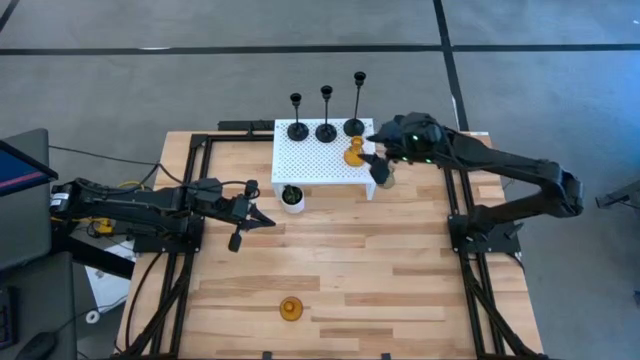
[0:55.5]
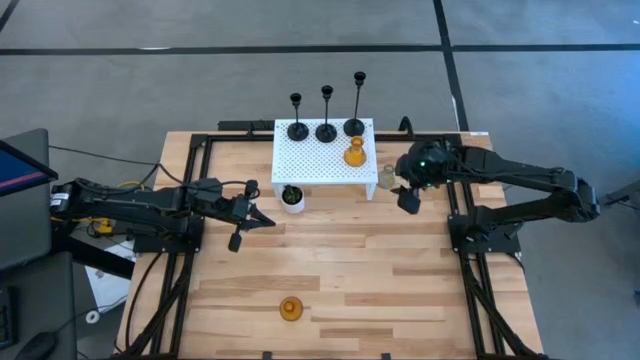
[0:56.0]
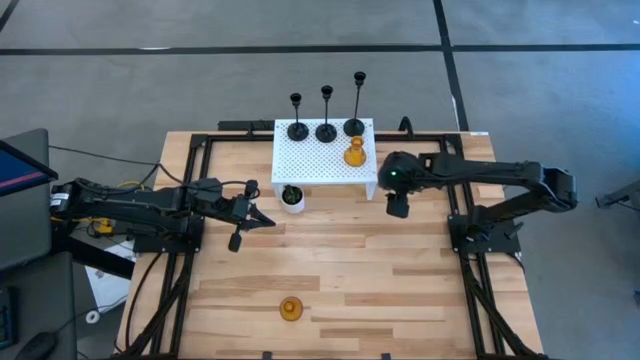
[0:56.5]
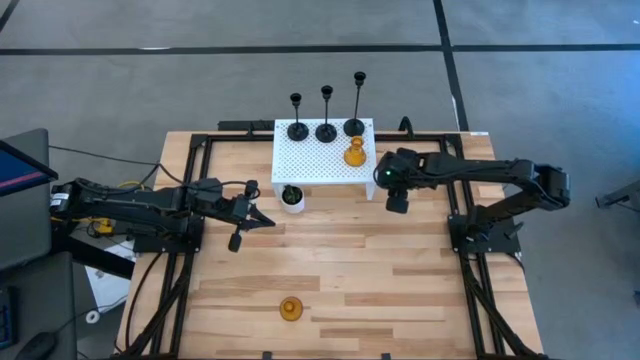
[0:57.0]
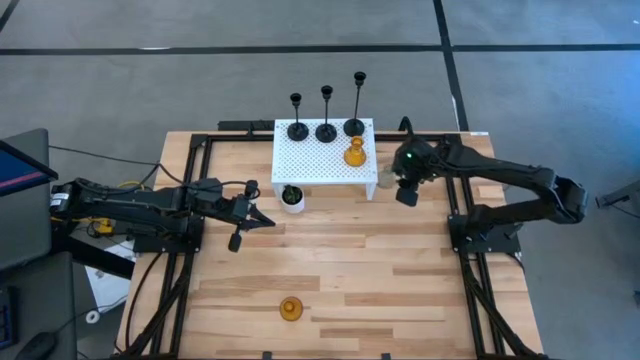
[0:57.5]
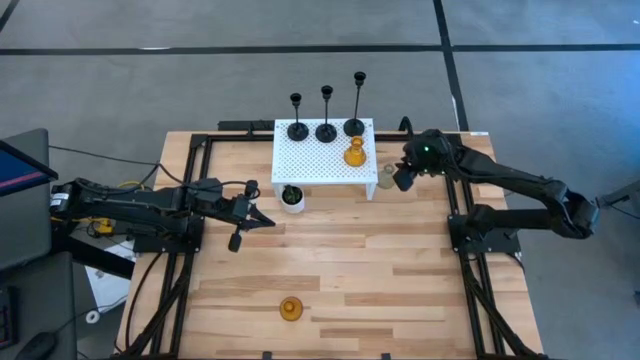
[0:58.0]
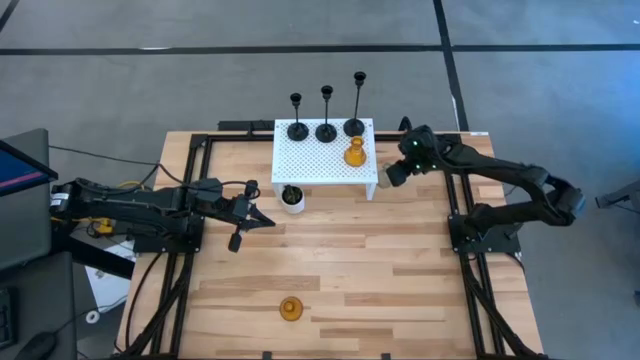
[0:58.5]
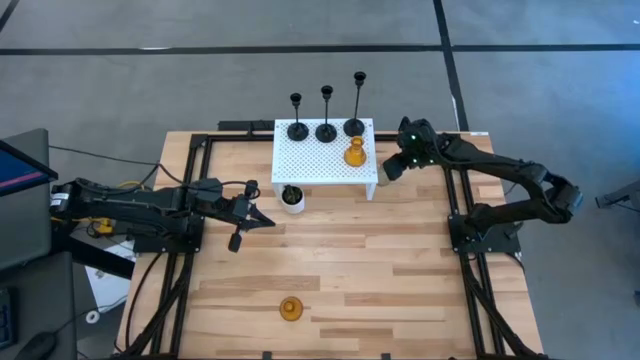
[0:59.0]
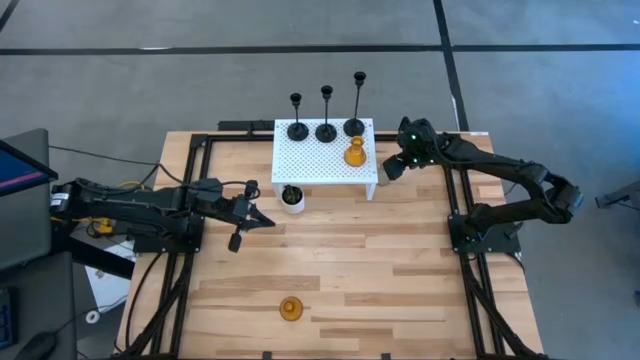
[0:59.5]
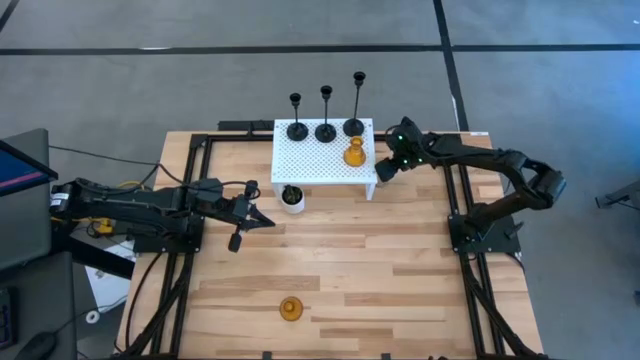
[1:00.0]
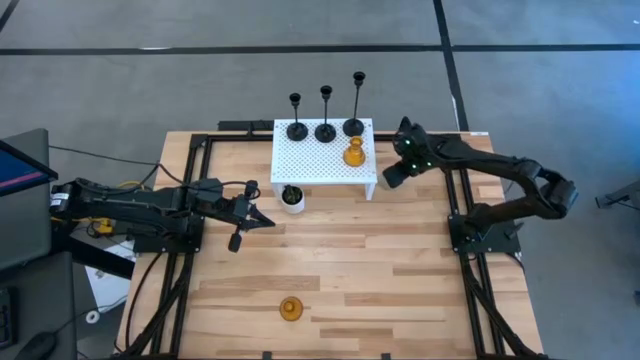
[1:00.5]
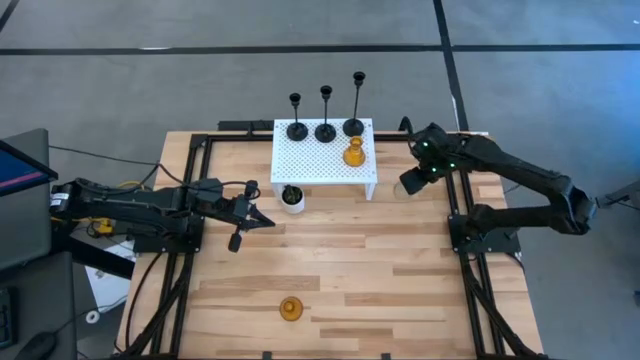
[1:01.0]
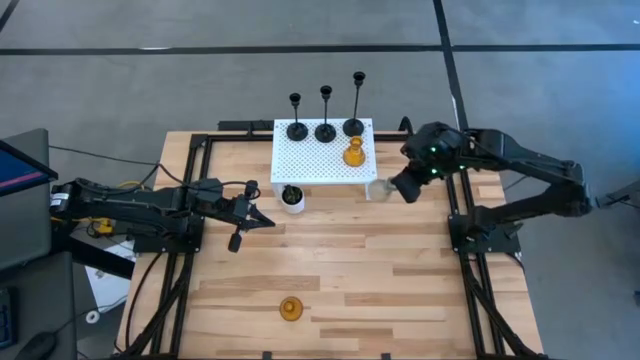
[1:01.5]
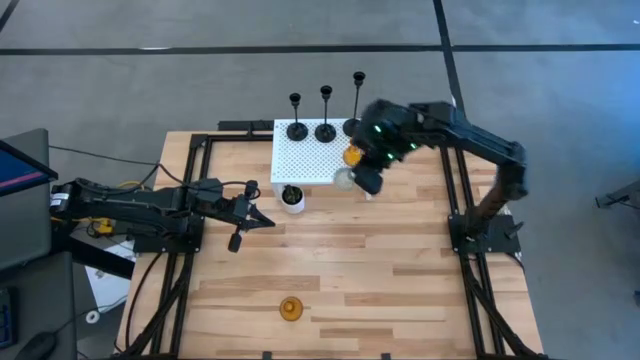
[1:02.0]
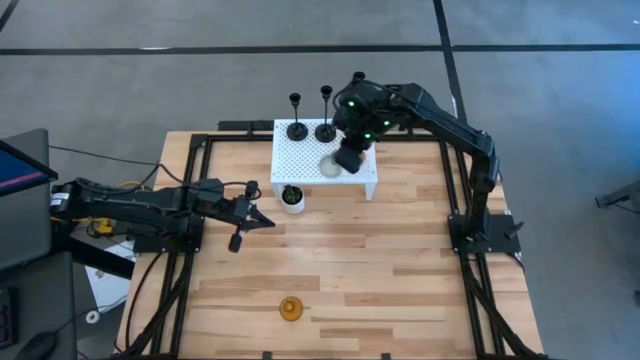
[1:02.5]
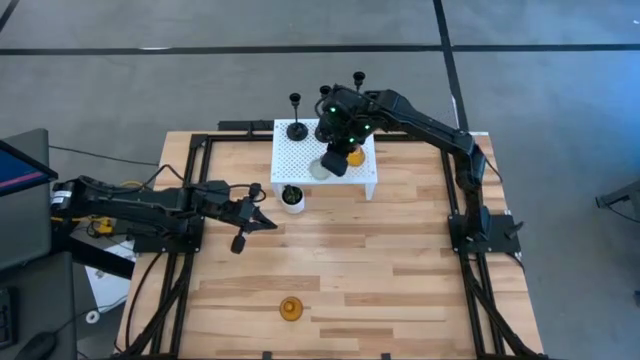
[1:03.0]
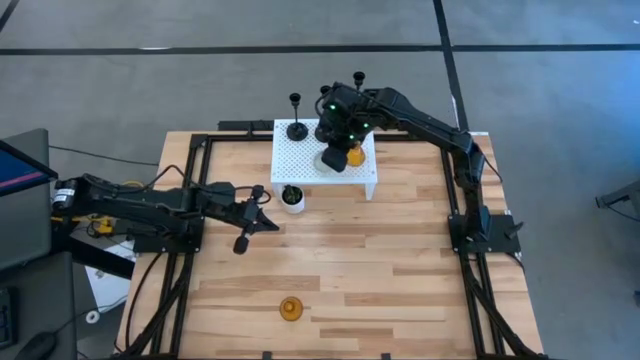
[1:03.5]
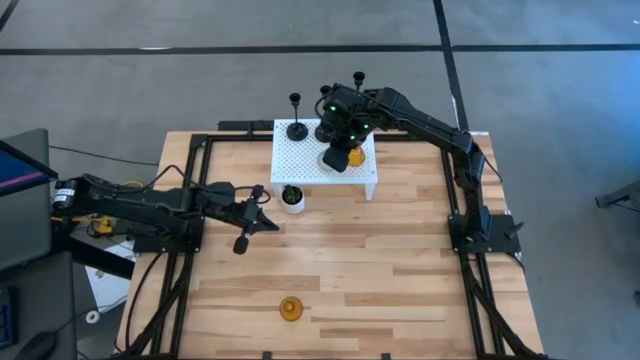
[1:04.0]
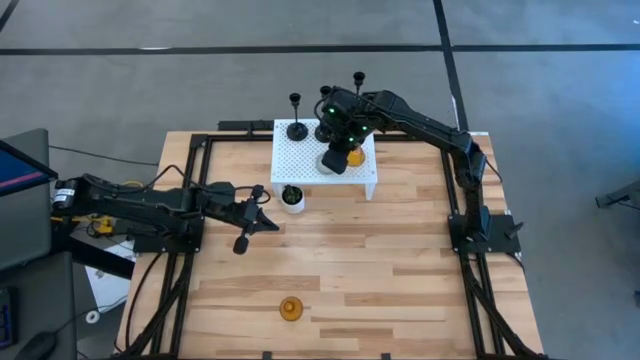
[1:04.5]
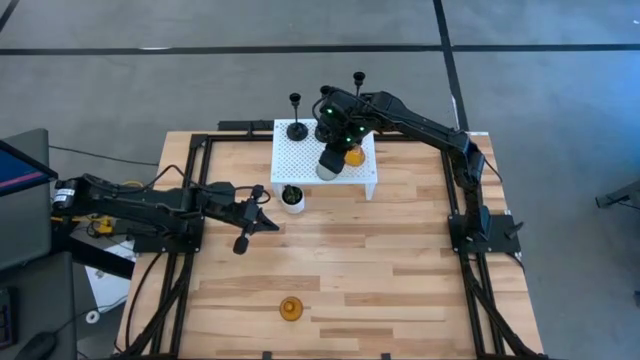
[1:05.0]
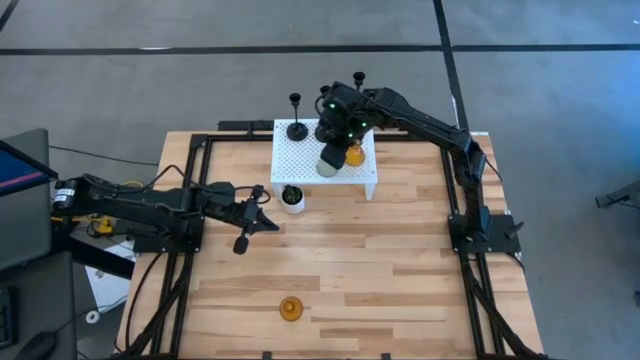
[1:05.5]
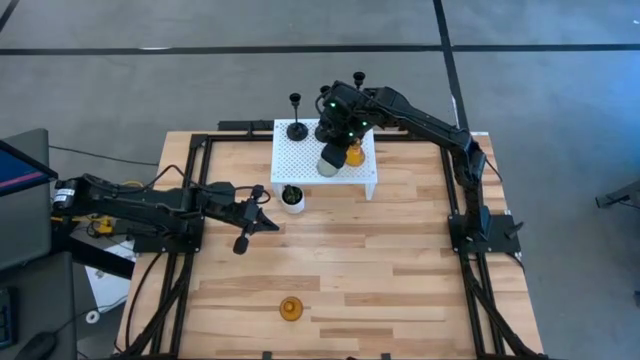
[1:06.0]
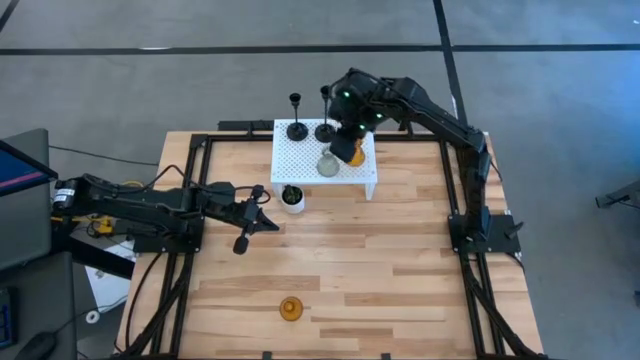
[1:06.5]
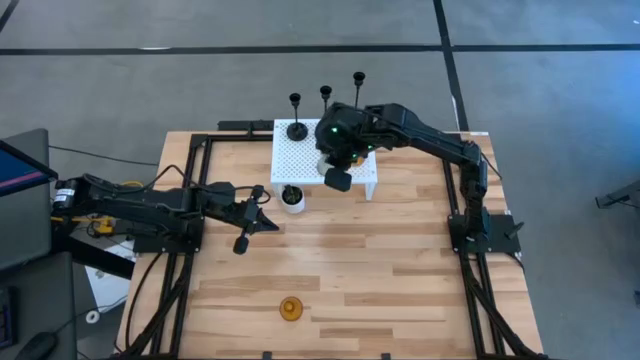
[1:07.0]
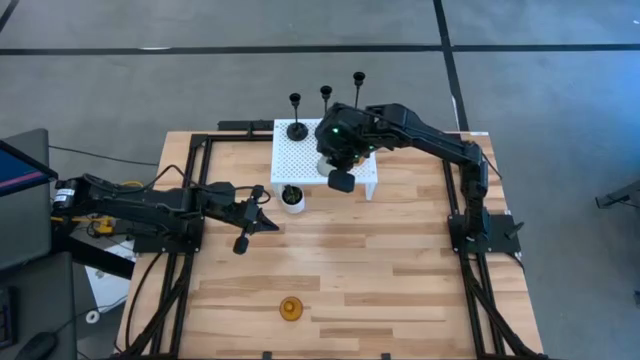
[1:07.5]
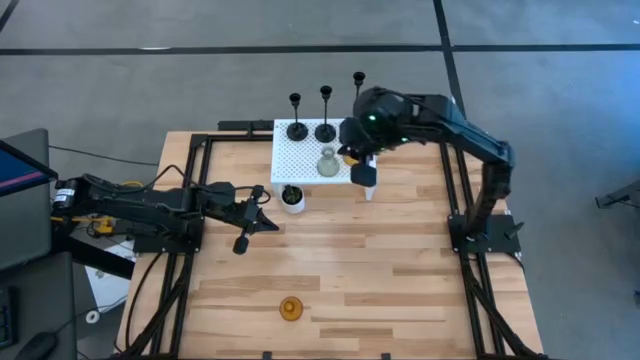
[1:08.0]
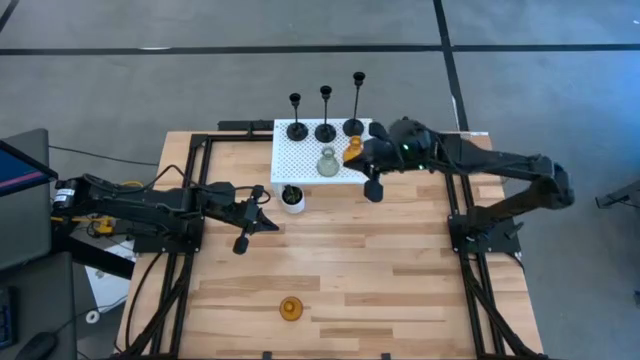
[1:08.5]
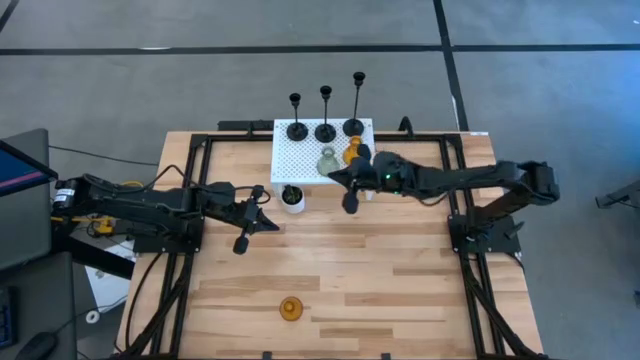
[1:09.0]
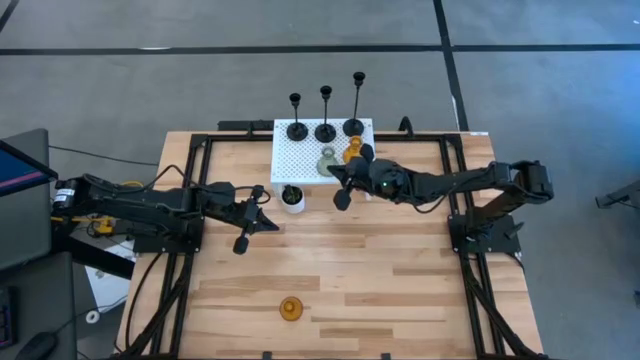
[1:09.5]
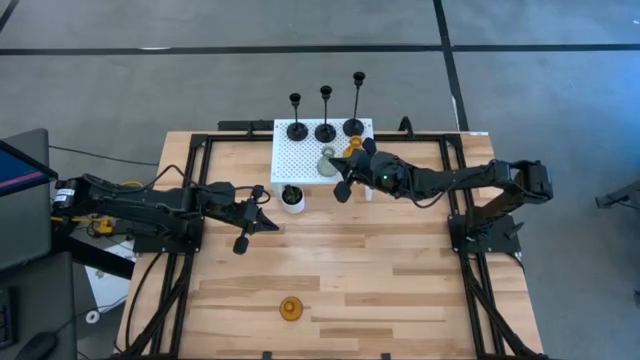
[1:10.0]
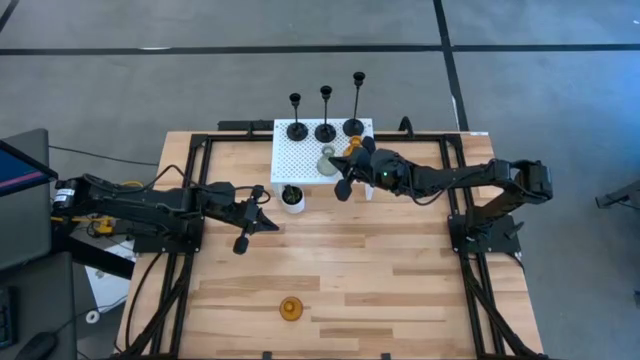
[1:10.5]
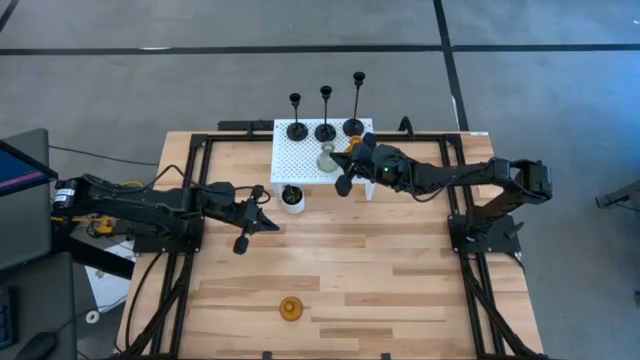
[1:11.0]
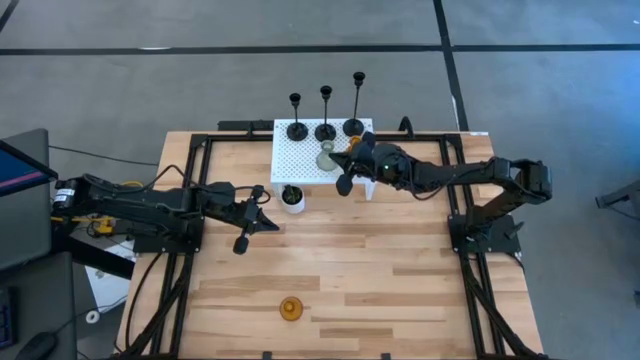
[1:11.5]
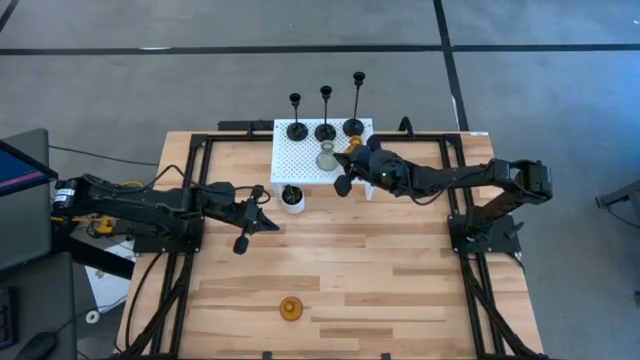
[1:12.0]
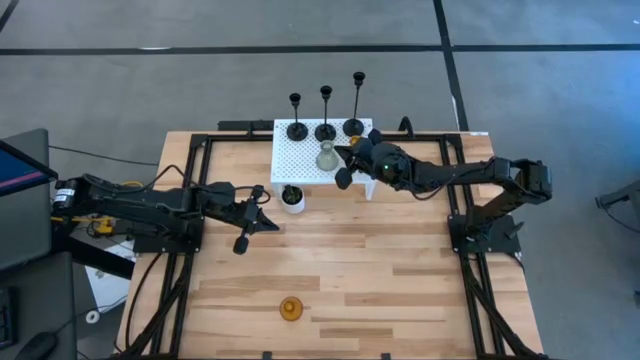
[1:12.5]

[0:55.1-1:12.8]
Task: Pick & Place candle stick holders
Put the transparent glass candle holder on the shelf aligned with the other glass candle holder

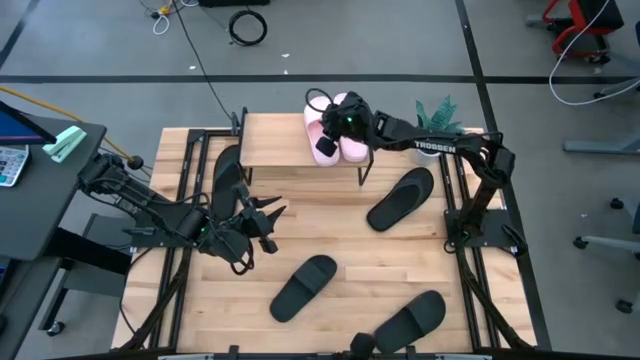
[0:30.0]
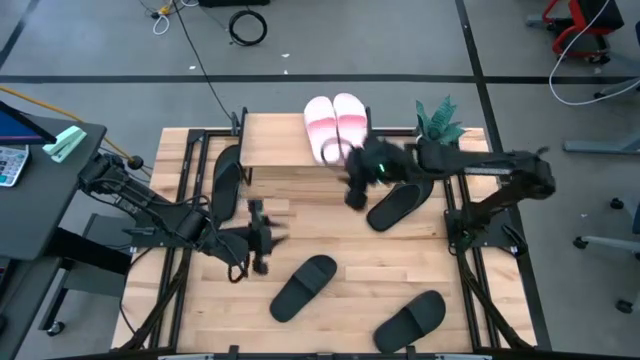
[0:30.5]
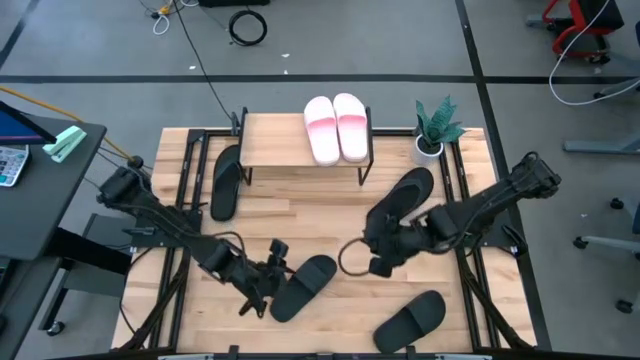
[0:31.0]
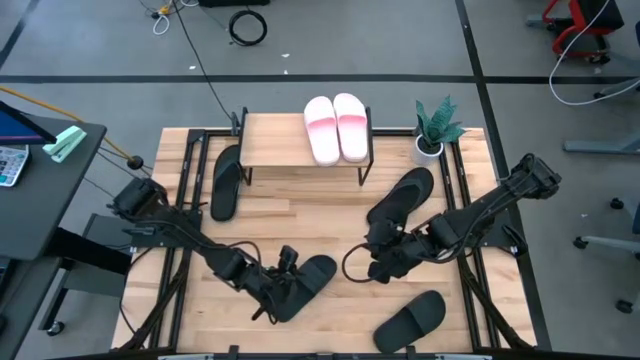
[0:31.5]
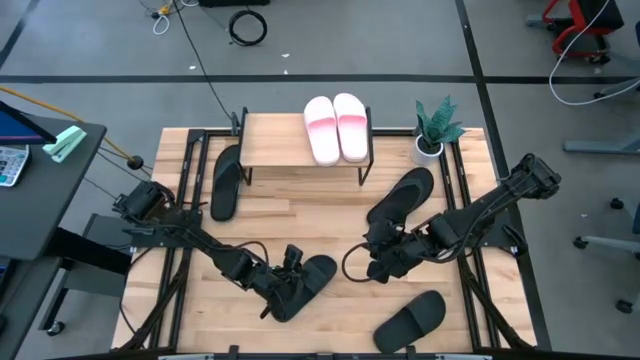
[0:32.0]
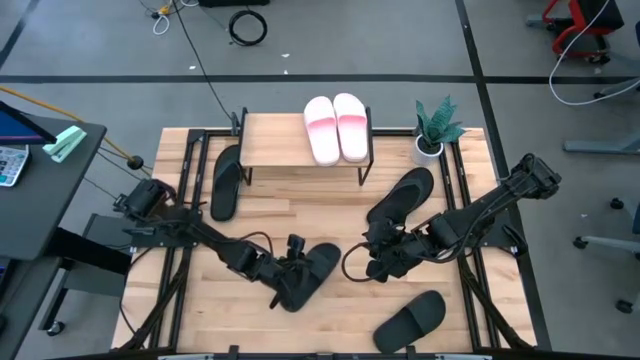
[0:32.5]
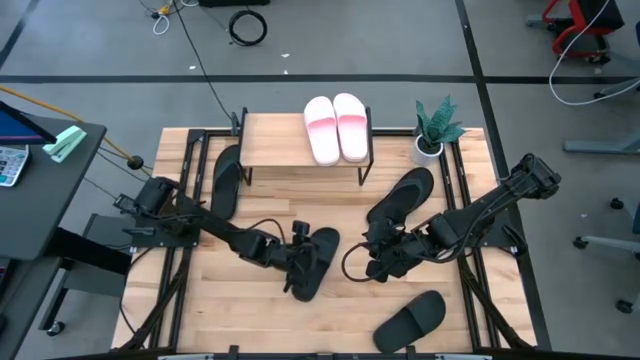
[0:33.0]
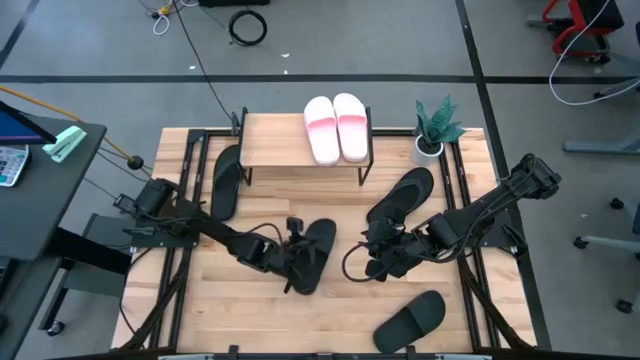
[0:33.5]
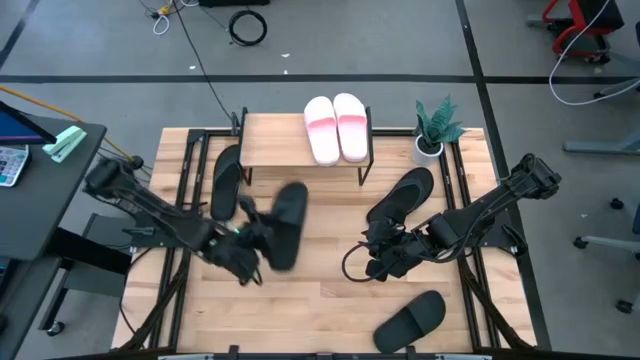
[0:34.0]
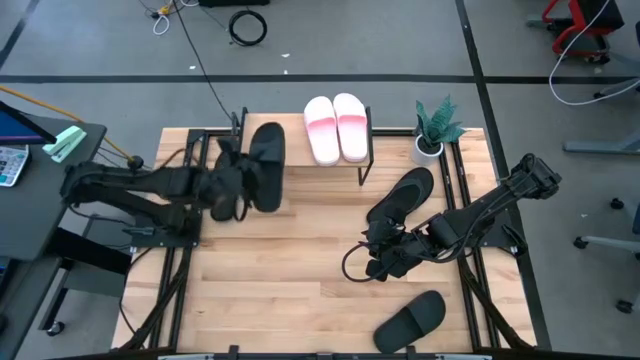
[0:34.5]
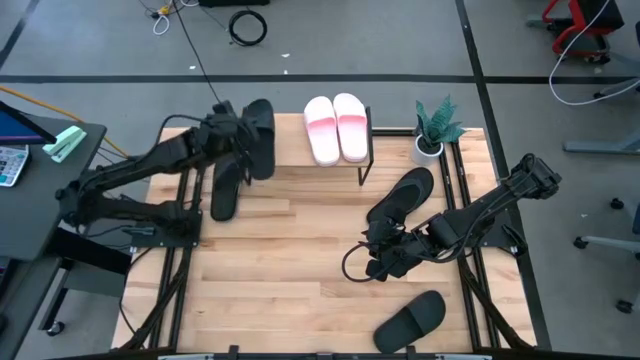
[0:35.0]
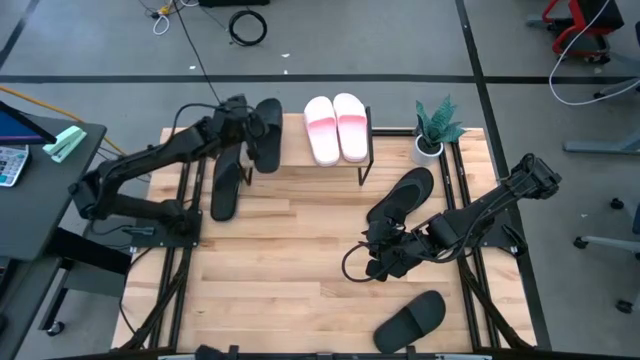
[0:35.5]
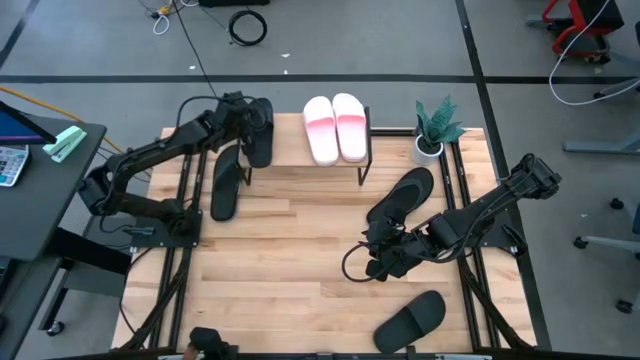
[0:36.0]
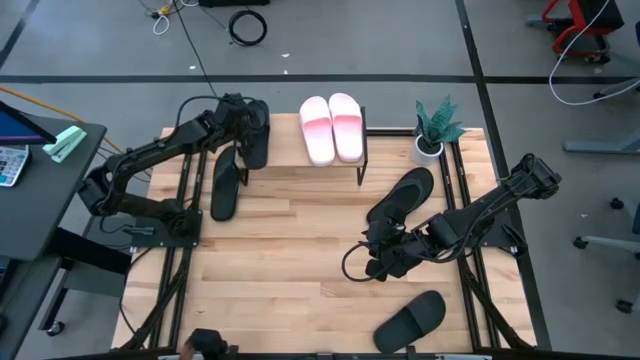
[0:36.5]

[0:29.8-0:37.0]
Task: Pick and place slides into the shelf
Put the left black slide on the shelf
